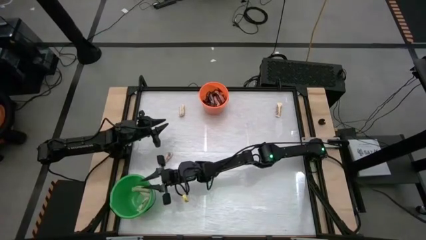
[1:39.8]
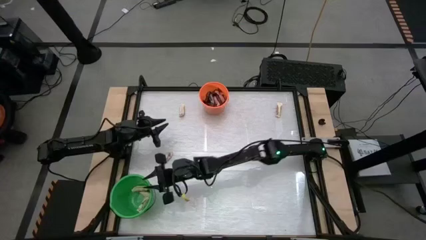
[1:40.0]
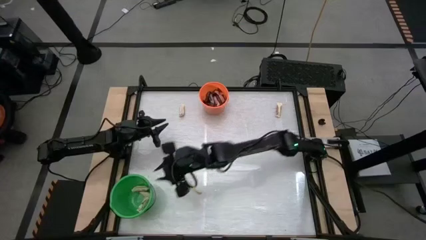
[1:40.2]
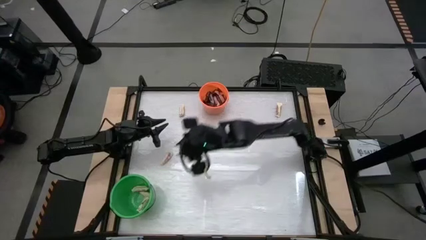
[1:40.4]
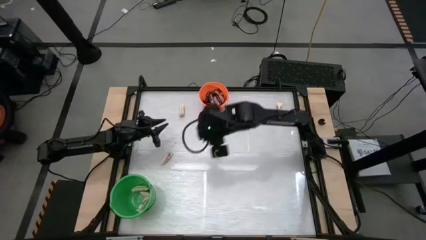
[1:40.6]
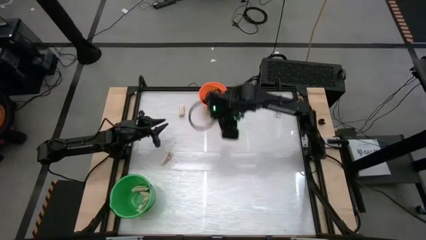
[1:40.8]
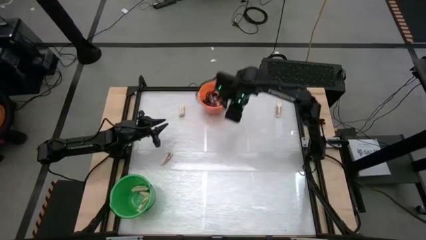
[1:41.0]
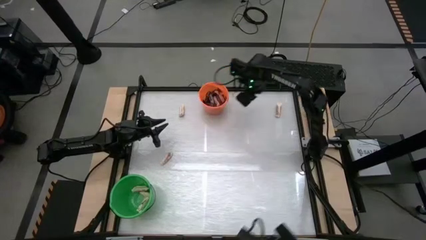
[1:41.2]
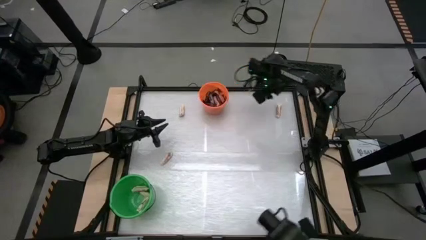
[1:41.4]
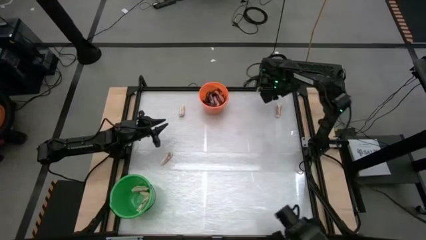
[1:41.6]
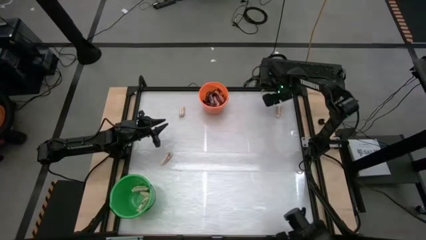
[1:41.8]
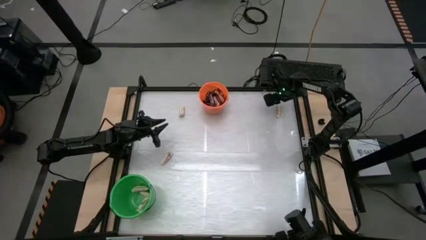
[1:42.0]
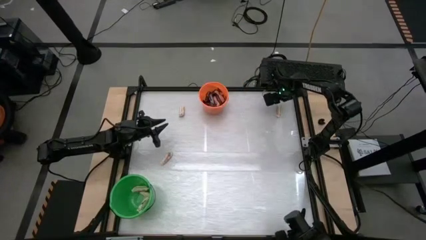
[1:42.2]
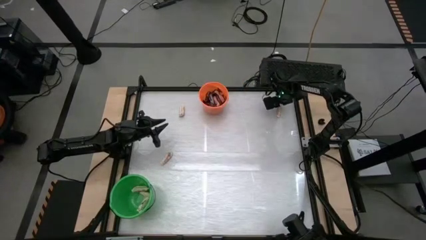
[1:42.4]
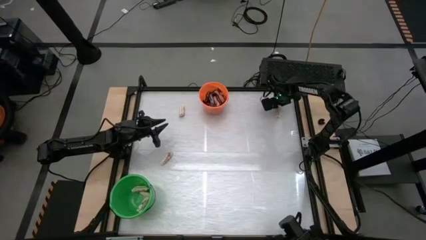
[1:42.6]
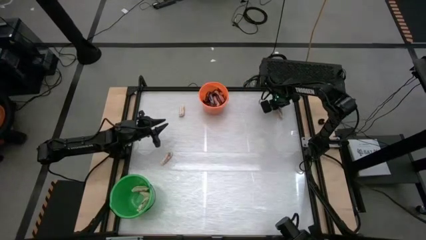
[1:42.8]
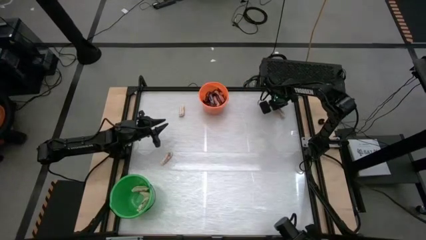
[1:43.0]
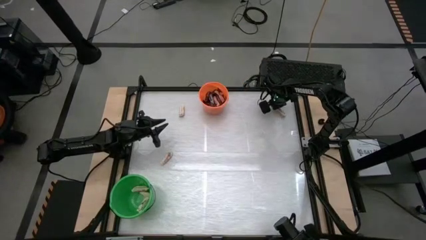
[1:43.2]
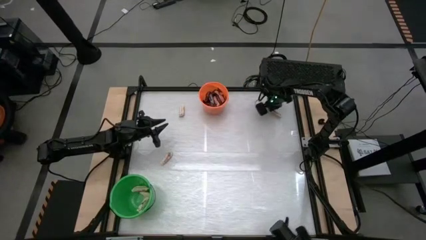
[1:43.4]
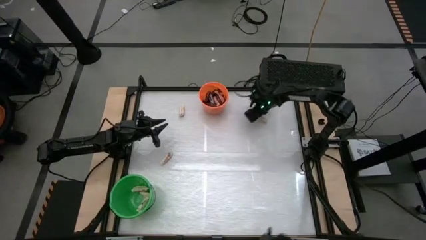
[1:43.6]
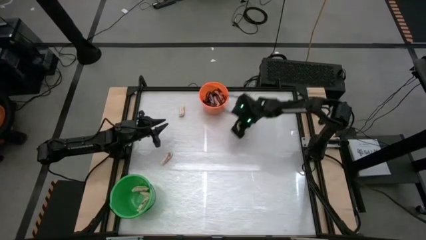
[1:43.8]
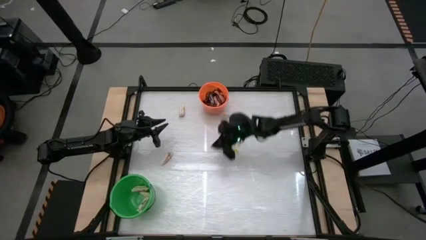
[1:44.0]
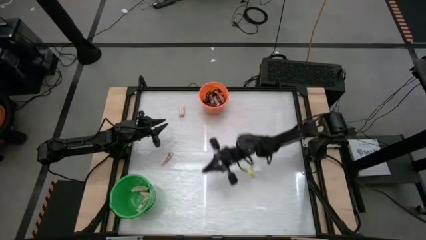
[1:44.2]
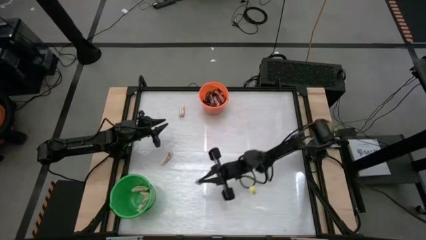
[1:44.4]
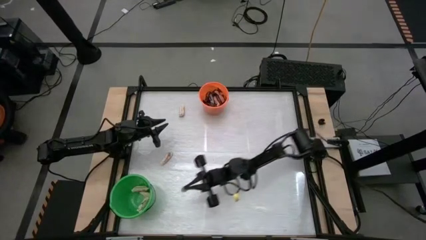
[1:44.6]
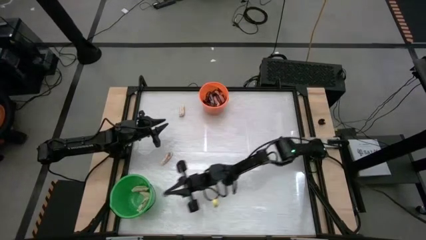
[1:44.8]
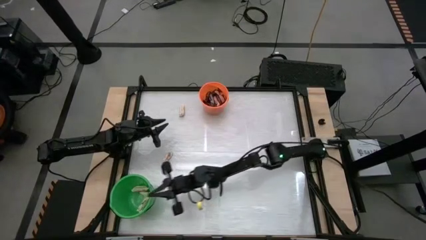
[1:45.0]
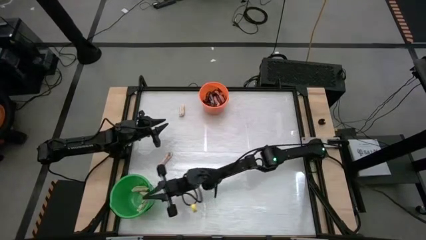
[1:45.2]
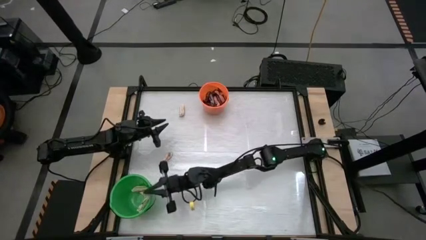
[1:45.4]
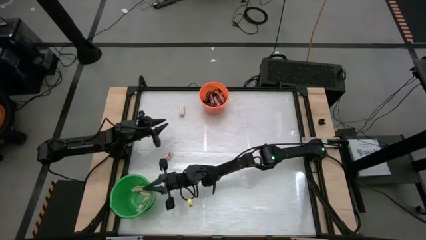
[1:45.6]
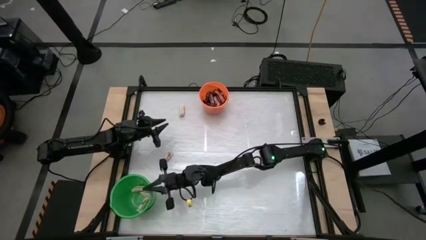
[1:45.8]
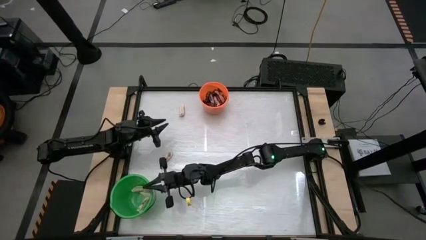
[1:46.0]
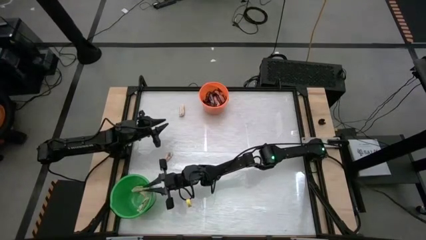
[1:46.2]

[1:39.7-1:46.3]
Task: Sort candy by brand, put in halloween buckets
Put the white chocolate bar into the green bucket

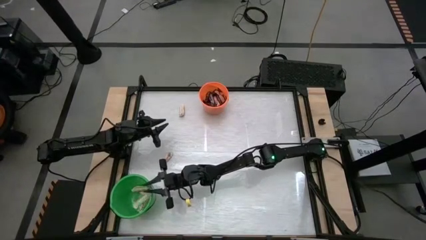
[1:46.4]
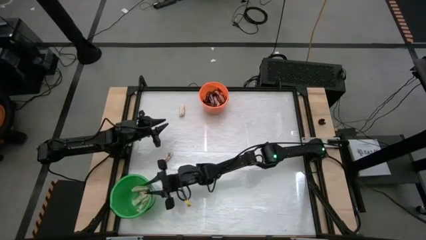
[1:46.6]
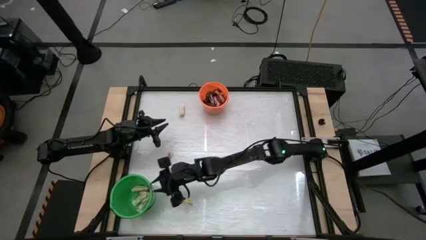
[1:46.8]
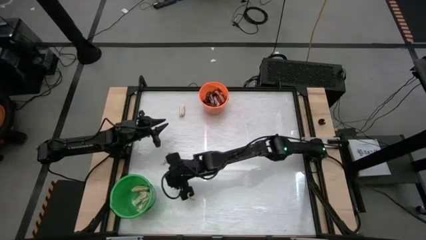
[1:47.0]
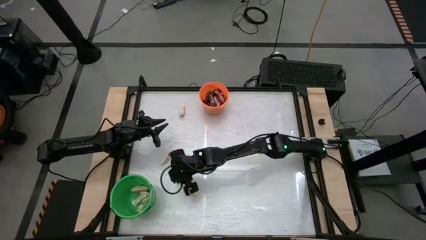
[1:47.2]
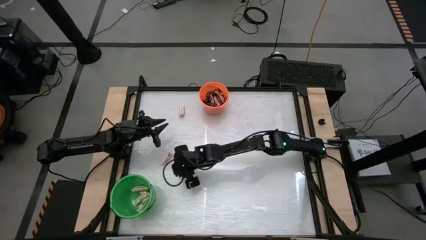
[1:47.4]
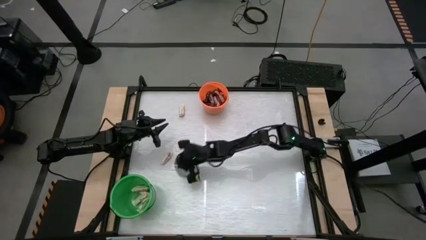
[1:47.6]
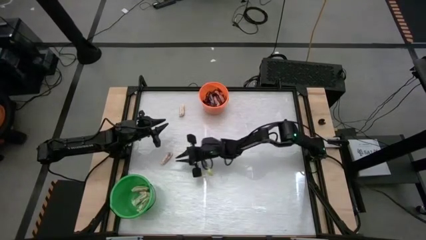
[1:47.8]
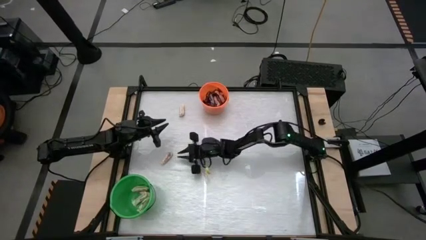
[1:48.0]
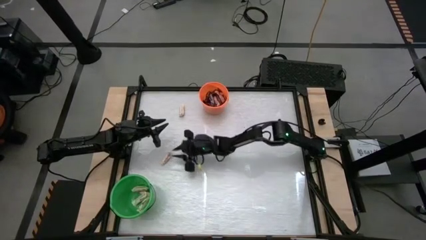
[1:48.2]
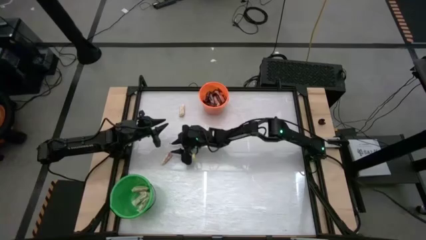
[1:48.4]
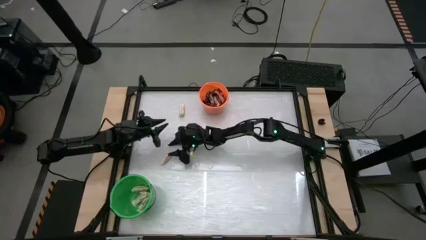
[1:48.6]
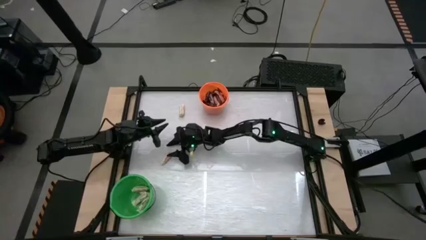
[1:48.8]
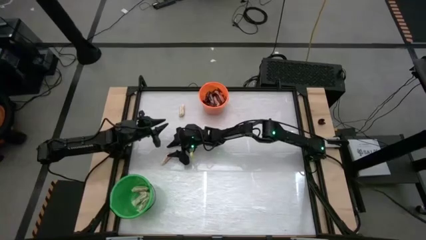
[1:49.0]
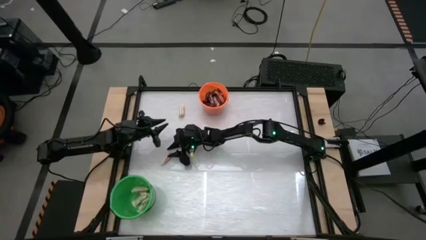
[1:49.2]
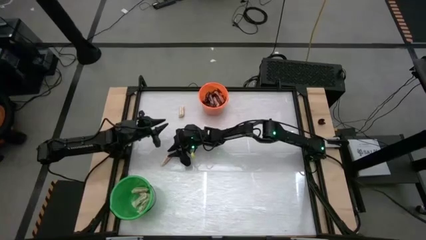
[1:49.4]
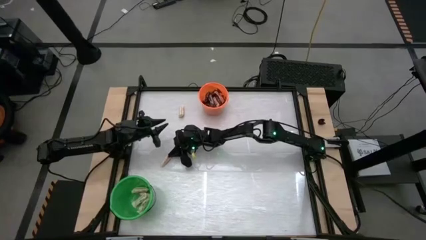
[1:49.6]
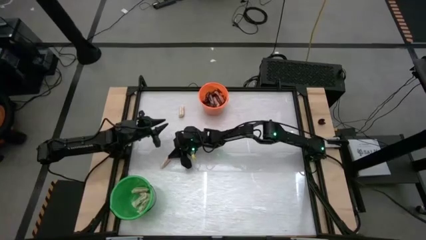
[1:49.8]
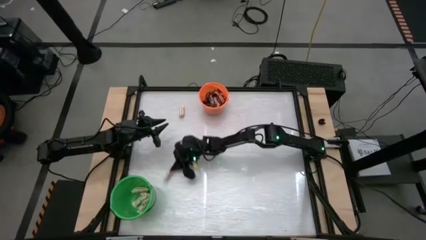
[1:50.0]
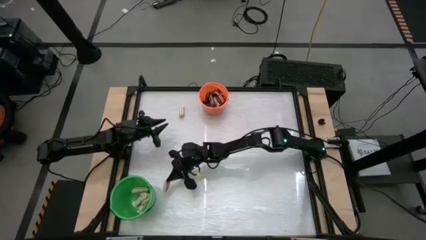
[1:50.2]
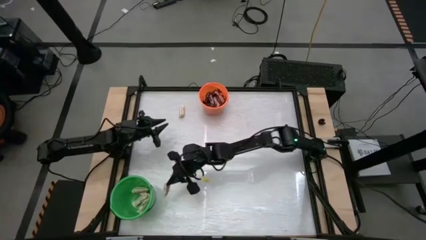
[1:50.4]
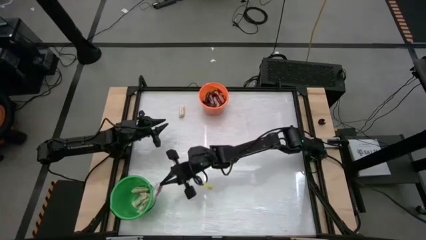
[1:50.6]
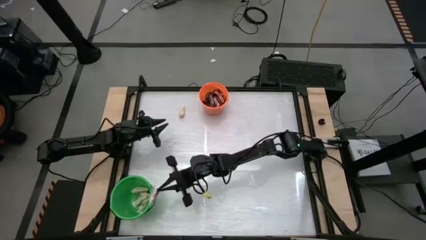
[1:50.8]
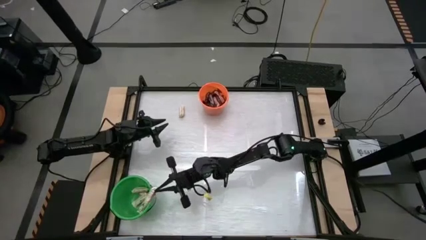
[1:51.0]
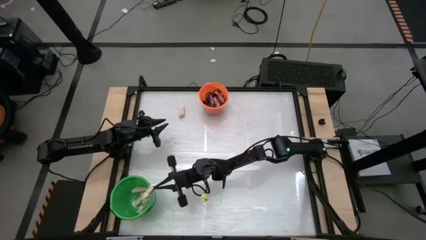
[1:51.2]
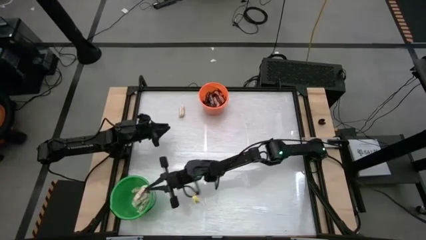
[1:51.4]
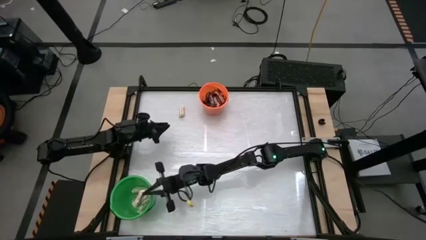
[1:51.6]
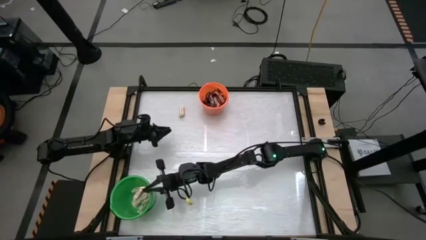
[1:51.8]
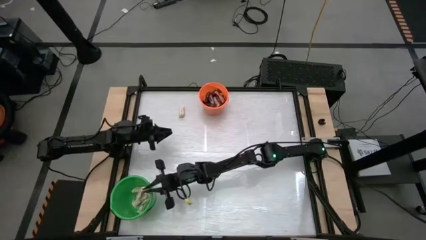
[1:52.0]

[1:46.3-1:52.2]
Put the white chocolate bar into the green bucket

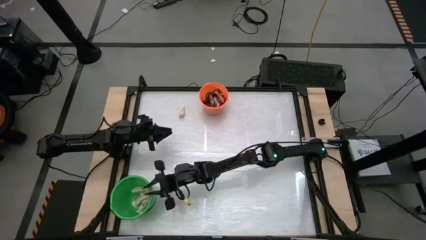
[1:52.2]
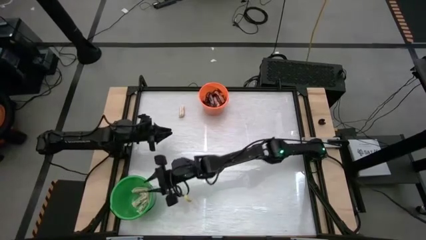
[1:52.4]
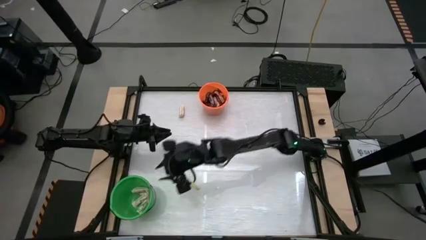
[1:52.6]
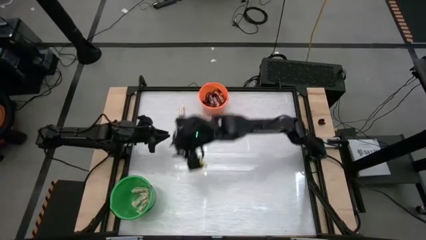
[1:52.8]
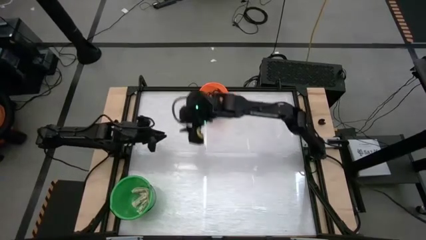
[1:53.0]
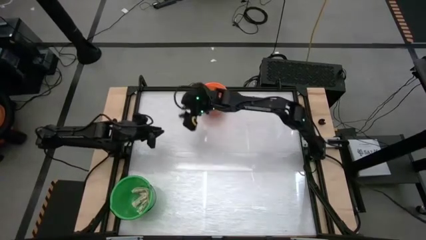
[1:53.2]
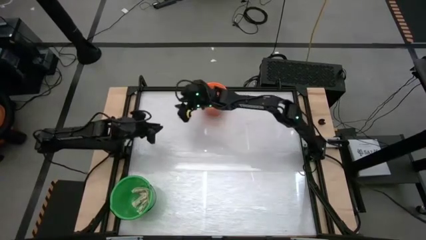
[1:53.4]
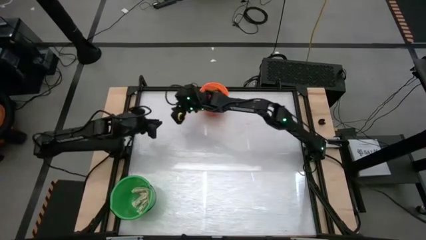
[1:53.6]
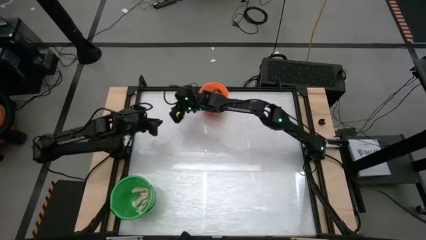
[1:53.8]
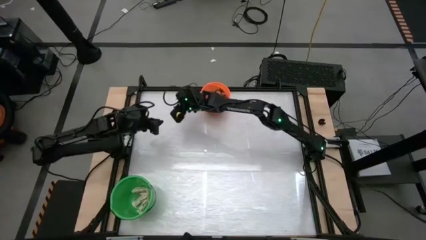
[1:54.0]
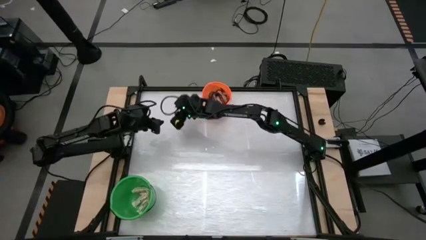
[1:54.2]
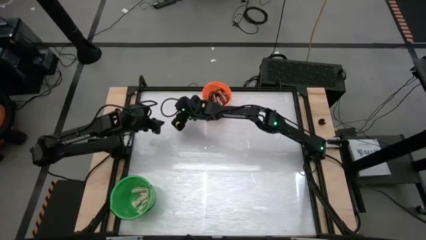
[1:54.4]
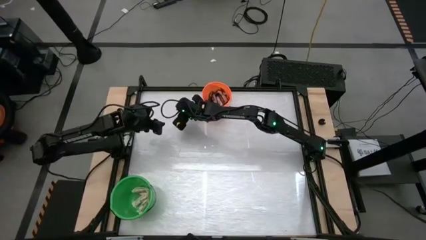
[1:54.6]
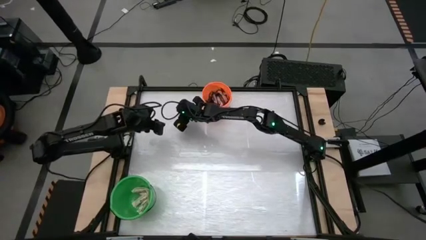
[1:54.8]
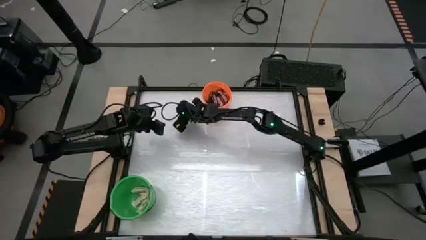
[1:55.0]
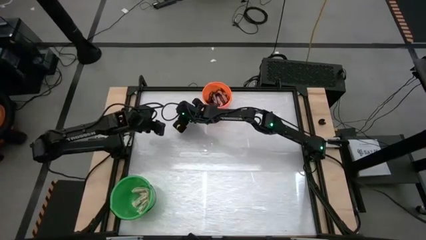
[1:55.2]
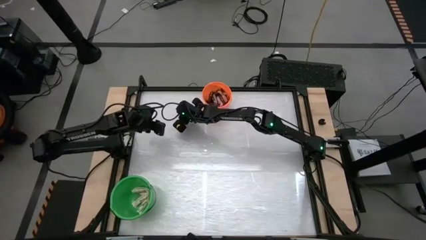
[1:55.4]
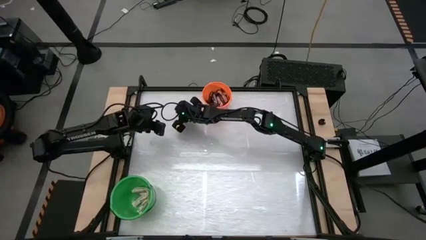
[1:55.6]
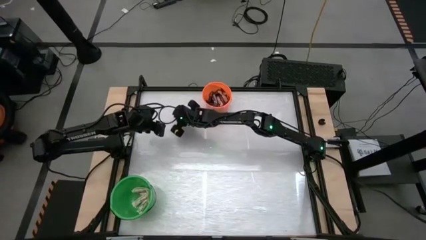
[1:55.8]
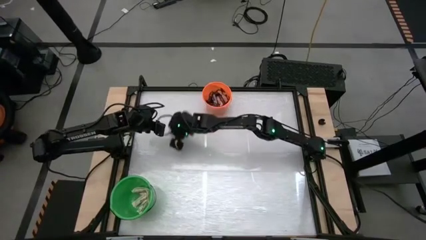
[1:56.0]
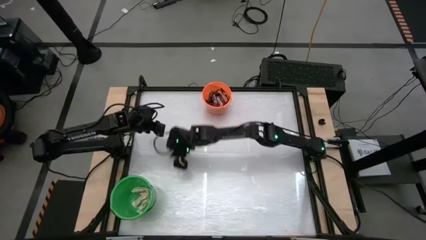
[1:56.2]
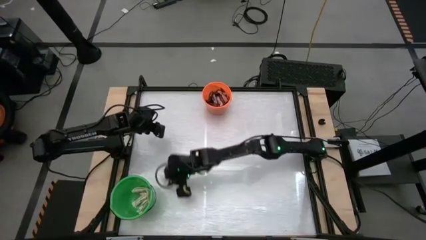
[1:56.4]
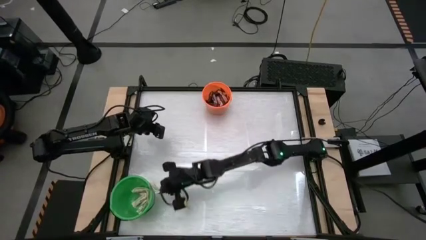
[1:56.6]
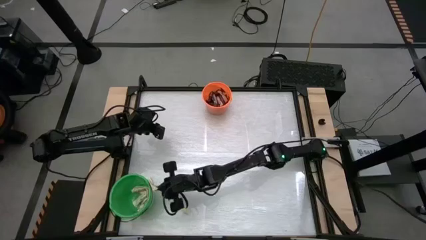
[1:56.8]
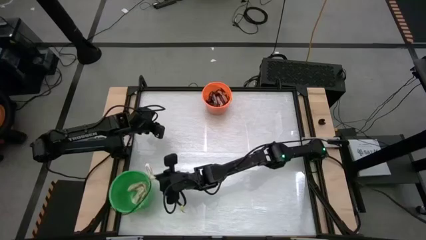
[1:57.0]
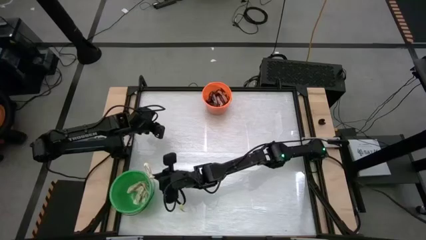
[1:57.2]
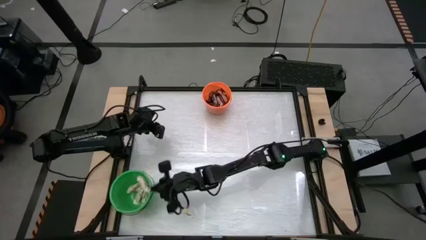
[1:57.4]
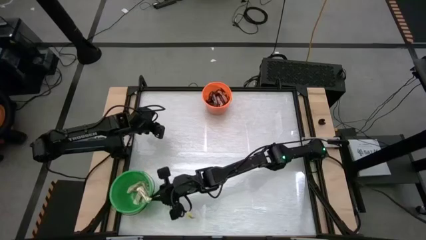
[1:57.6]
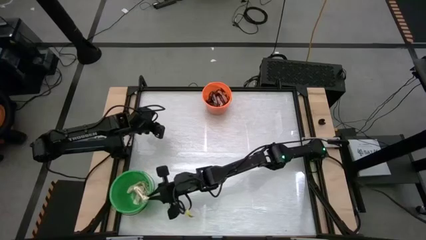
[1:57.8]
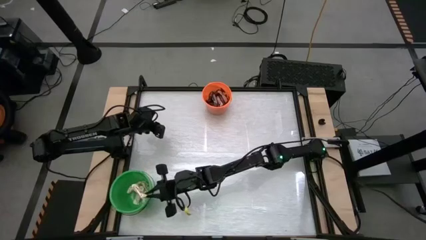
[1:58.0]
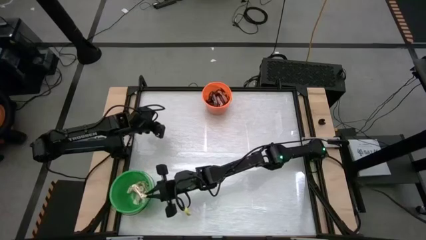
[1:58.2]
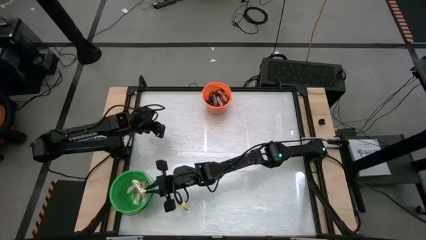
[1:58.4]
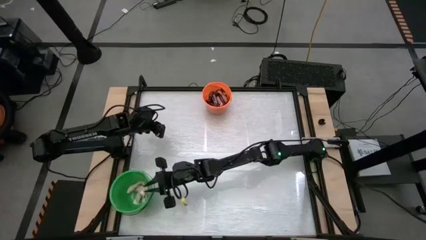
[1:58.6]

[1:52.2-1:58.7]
Put the white chocolate bar into the green bucket
